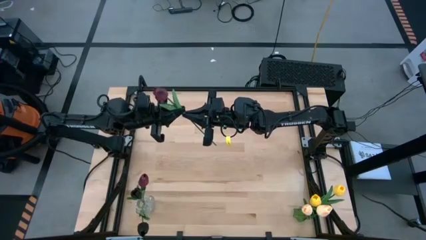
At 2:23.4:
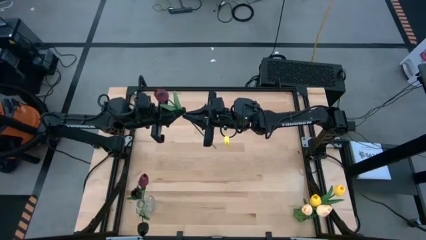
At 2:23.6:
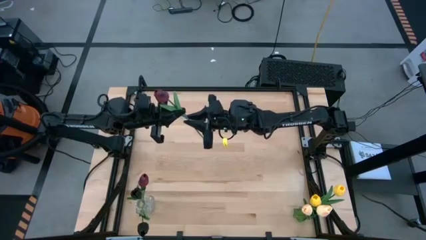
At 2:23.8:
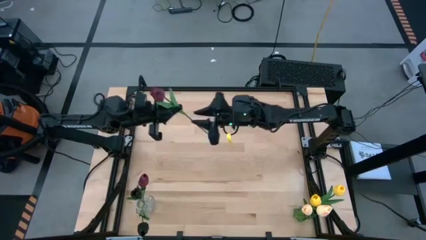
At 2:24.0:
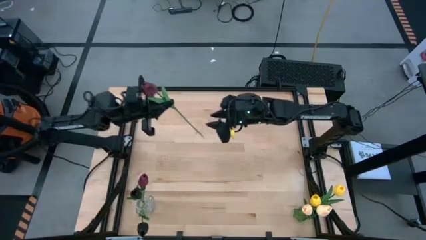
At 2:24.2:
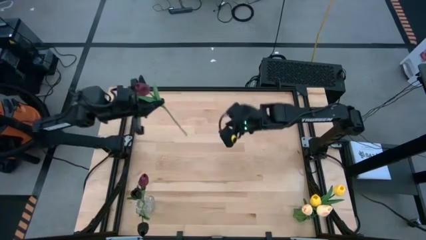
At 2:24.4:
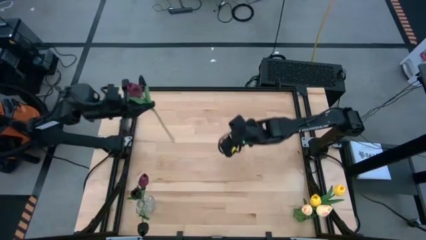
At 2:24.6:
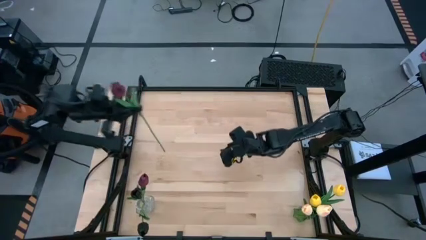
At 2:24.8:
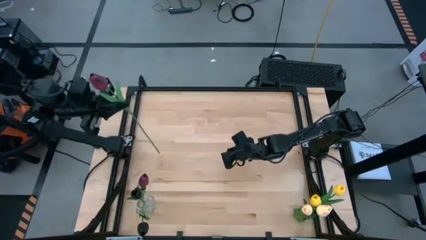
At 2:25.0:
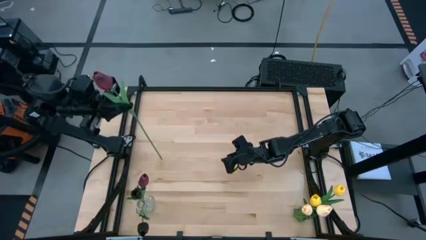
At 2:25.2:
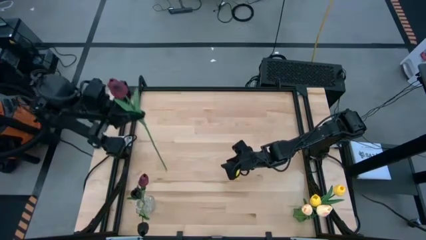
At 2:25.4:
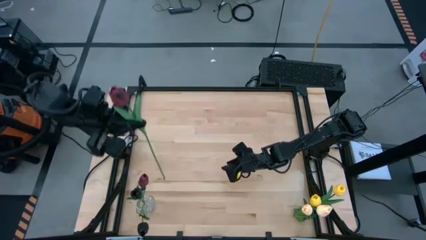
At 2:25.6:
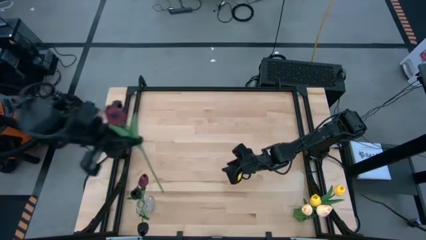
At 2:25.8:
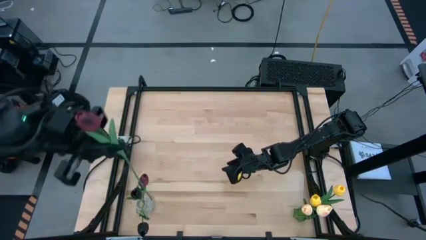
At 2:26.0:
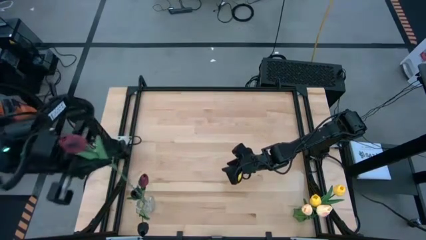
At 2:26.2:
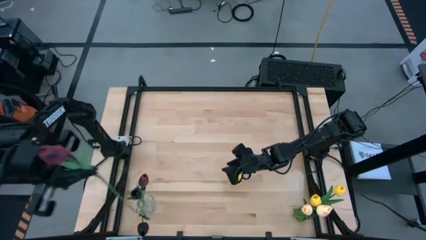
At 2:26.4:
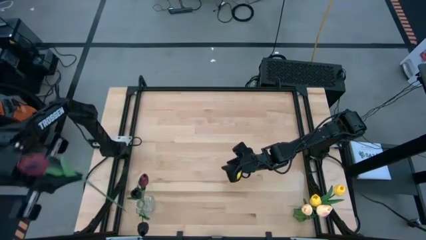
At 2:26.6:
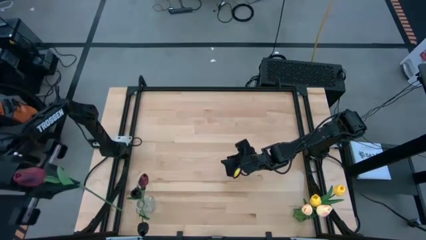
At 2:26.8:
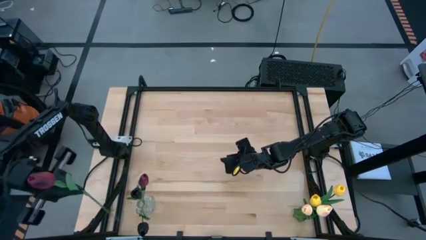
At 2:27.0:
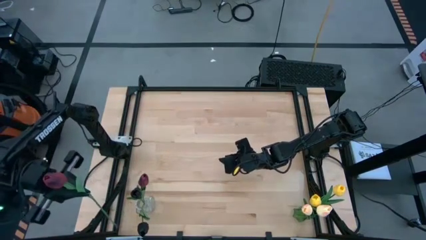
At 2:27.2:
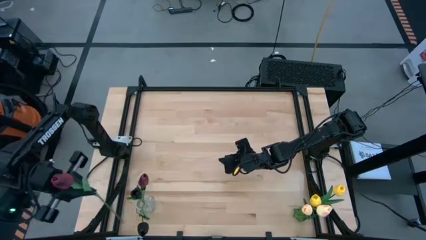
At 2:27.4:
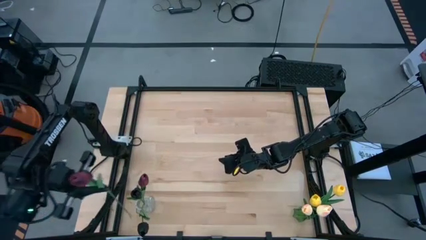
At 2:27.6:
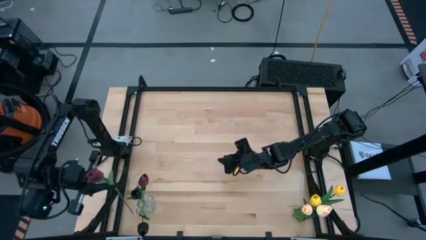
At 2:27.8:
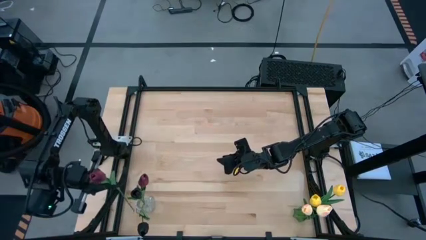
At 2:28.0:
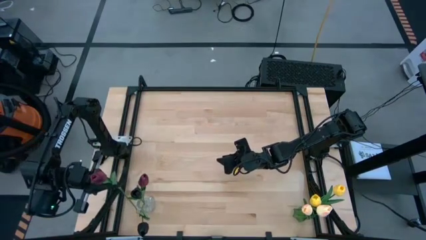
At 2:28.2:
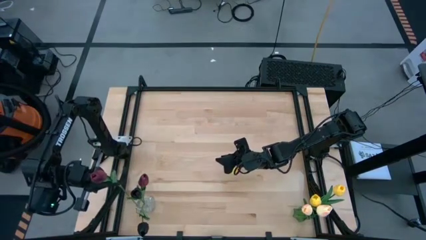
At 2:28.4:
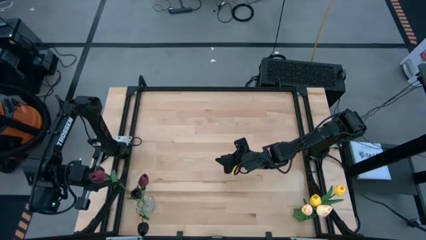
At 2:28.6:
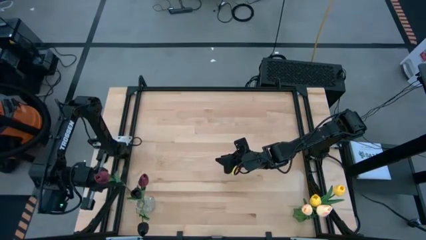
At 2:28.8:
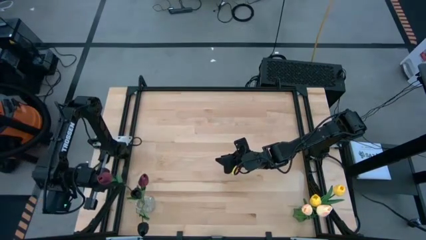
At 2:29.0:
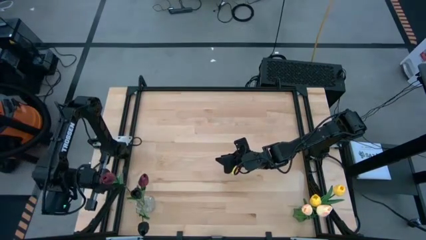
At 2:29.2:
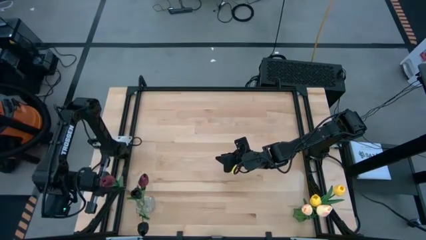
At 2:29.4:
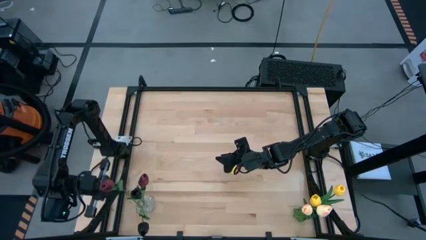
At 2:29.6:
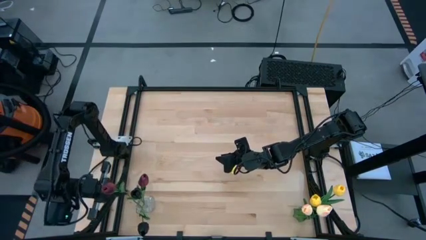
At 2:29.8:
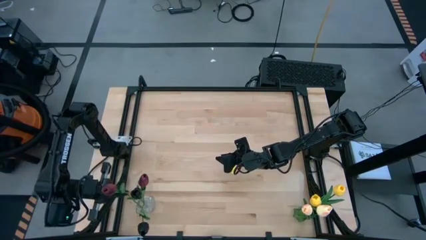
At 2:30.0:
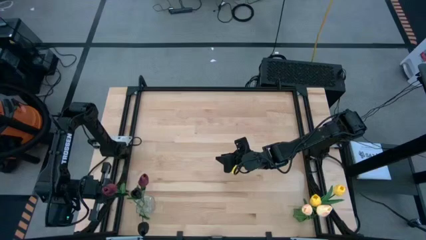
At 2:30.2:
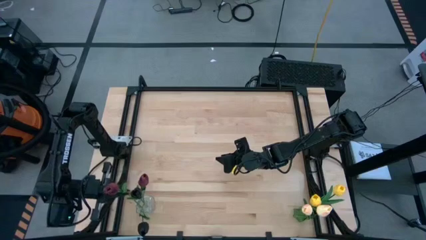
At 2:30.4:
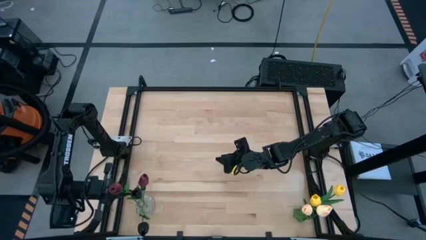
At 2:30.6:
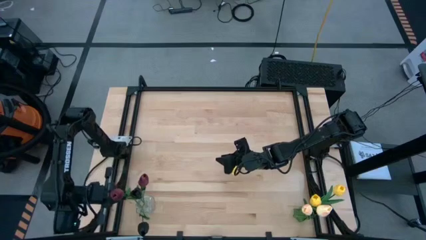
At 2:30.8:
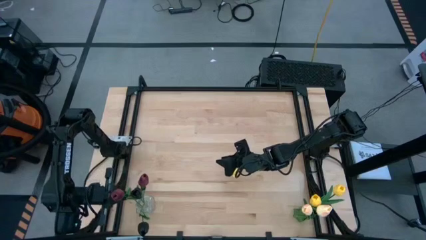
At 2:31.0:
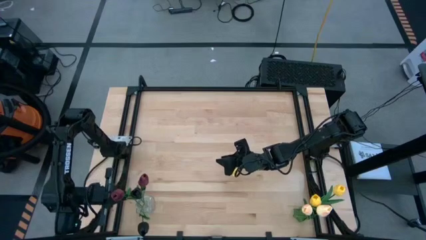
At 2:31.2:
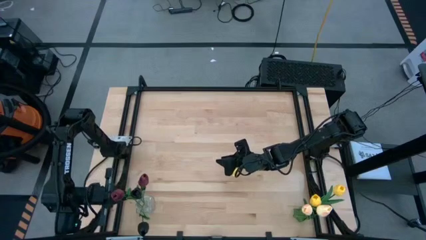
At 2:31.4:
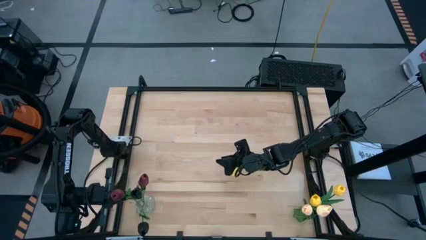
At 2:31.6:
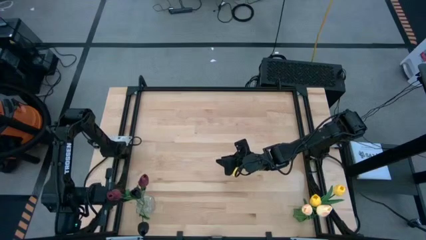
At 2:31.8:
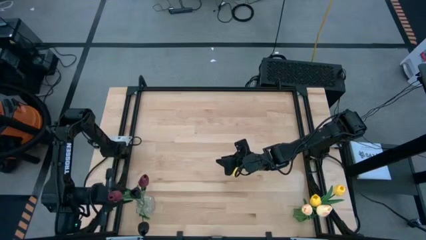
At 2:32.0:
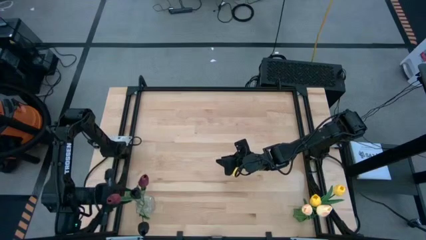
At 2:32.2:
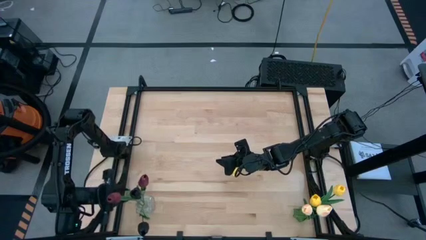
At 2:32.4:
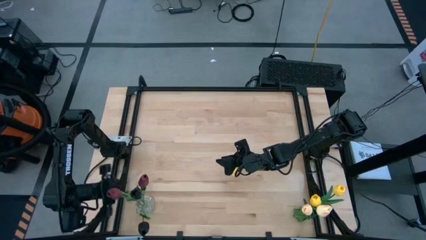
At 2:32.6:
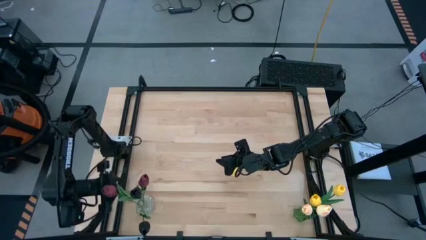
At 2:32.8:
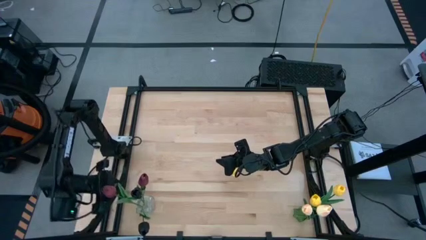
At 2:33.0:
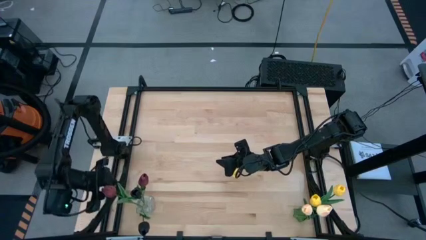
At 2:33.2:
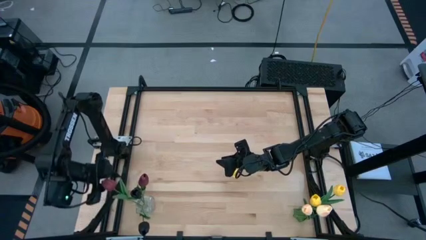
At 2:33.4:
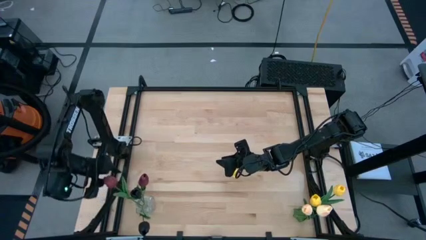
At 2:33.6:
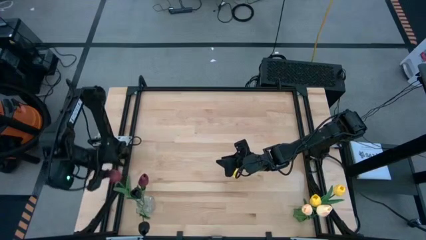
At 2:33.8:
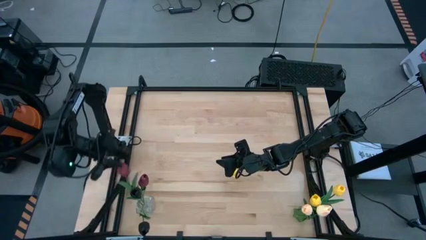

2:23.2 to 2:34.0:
Task: Sort flowers into vase by color
Put the red tulip into the transparent vase

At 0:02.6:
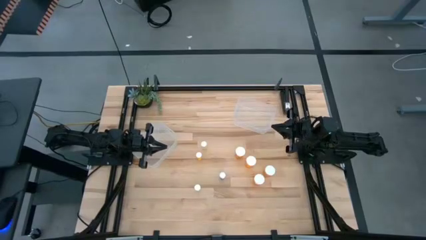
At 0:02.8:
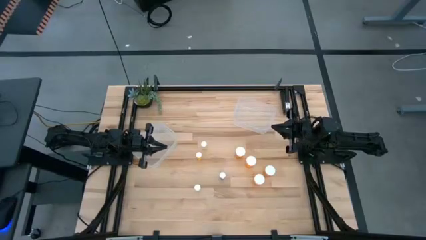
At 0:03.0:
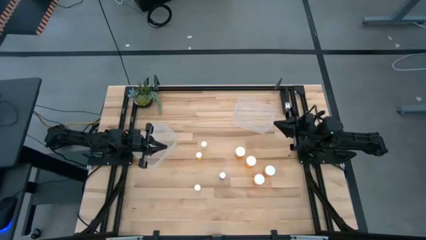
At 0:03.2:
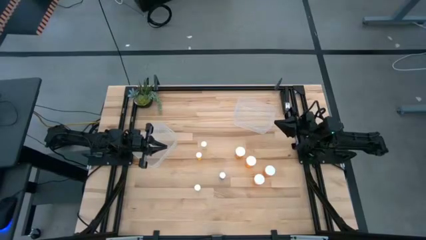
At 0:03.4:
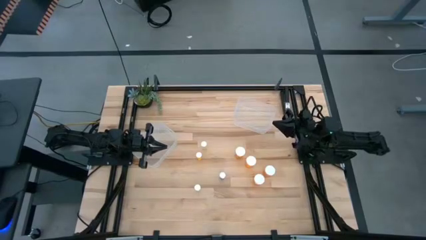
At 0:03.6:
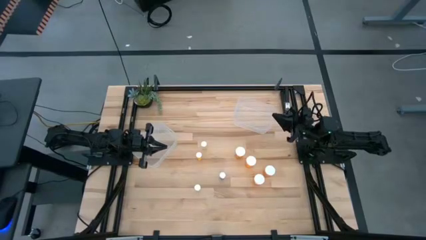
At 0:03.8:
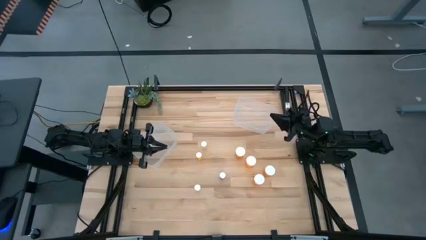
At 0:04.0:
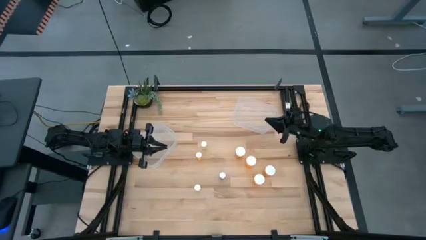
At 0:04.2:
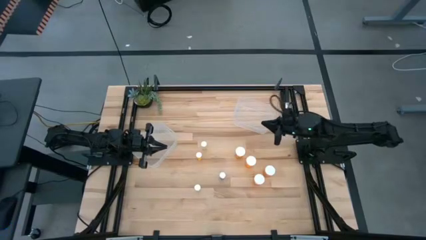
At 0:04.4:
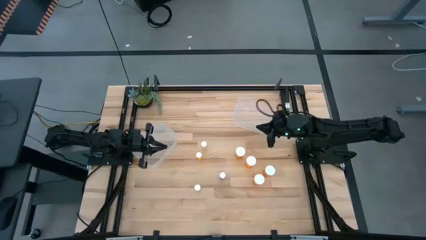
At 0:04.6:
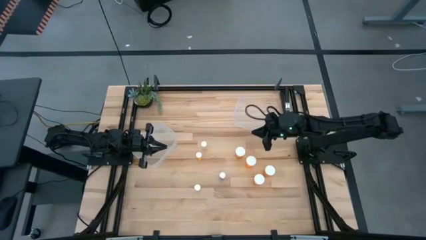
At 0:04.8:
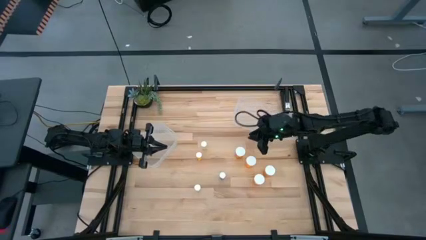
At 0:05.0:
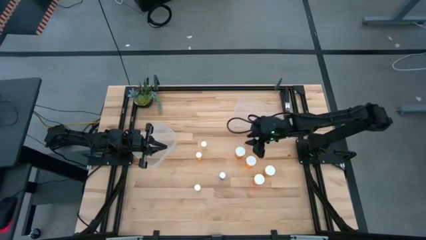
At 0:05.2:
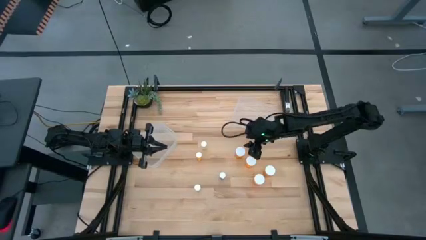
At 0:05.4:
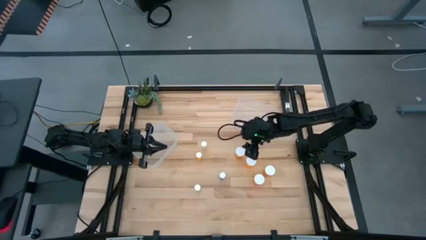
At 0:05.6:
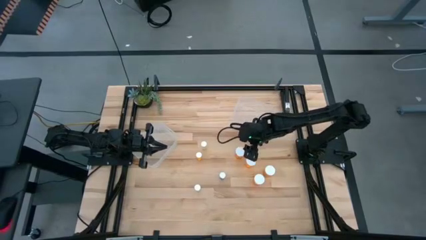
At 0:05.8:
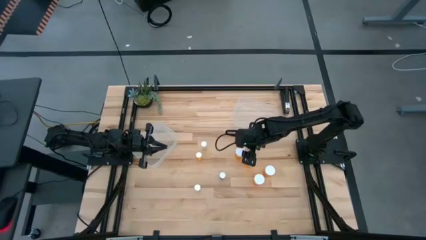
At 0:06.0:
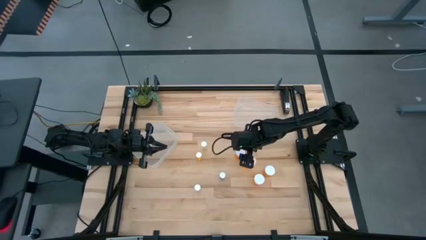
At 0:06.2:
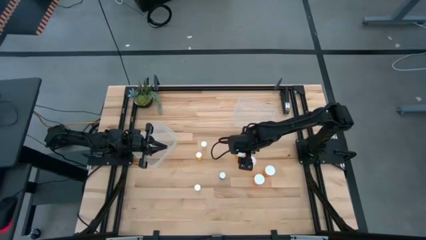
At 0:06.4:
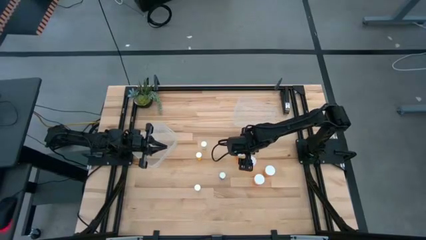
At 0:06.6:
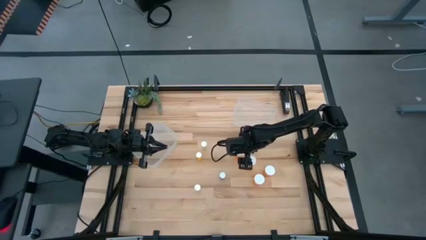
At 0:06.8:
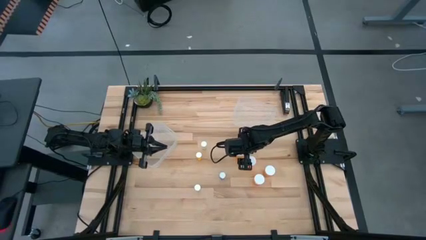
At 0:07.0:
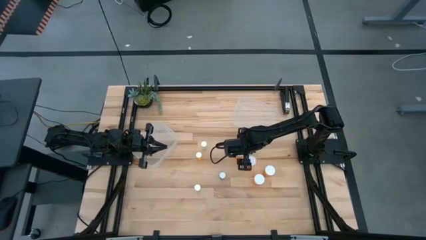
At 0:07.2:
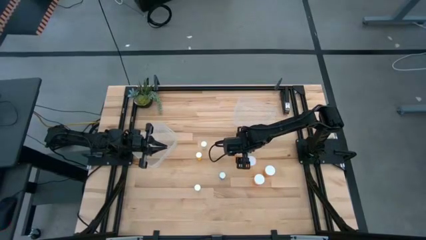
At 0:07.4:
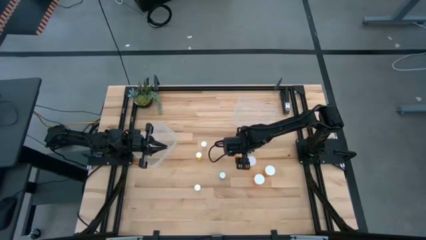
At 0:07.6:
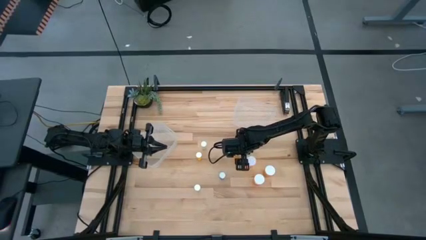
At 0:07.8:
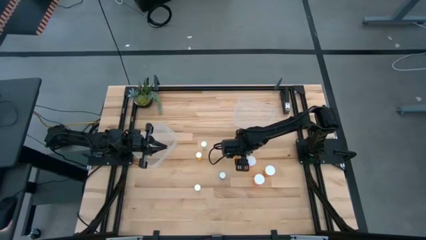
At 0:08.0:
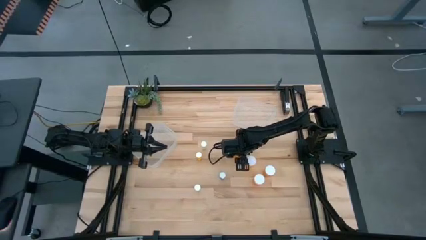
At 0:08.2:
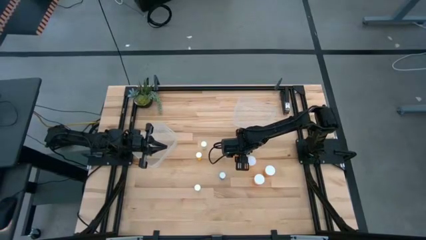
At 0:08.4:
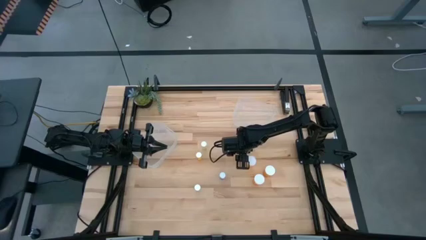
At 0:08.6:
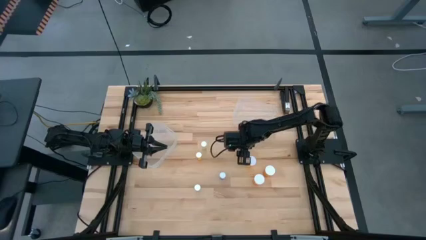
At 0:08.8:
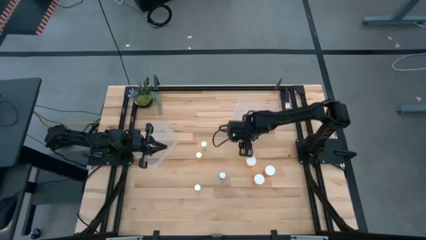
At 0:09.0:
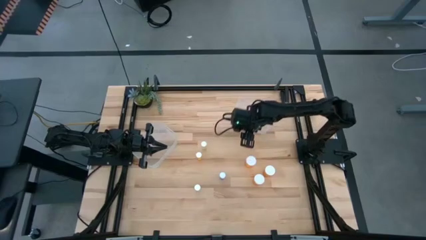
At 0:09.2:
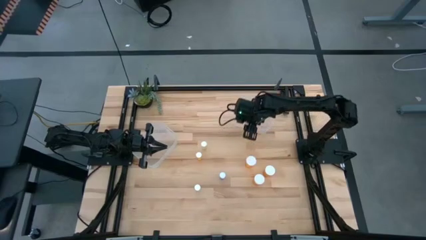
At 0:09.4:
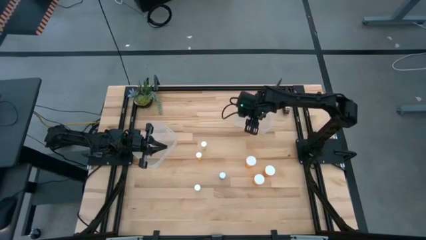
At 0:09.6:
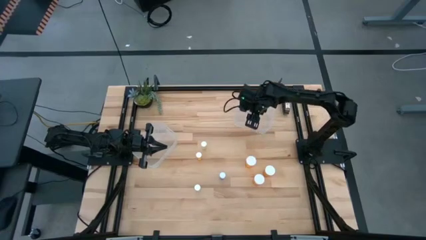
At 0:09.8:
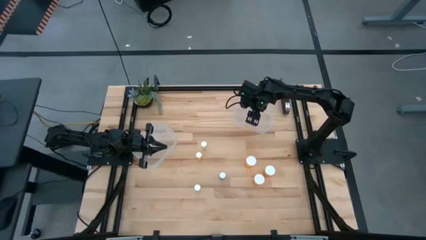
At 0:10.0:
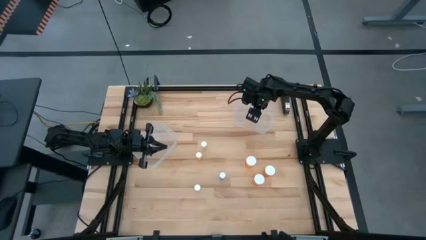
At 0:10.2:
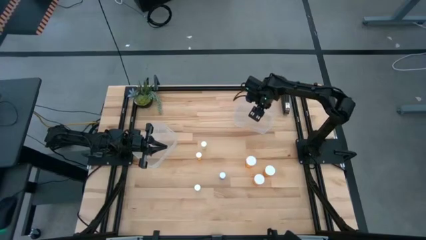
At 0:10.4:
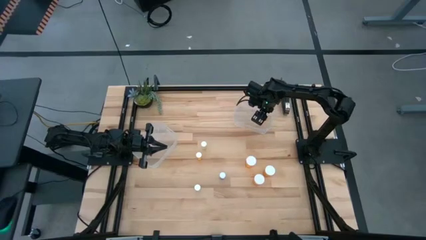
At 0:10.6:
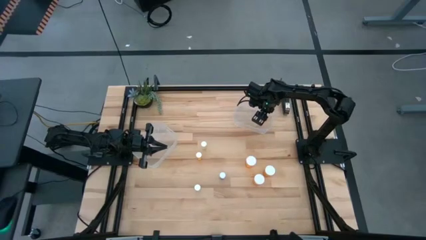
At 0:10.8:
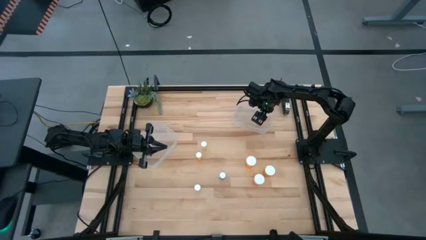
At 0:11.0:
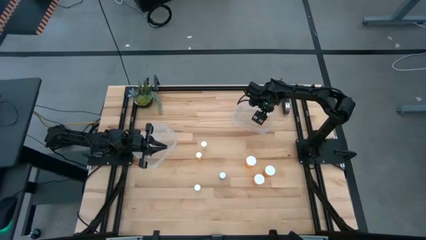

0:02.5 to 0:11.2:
Task: Pick and place medicine bottles into bin by pill shape (circle, oval)
Put the big orange pill bottle into the right transparent bin
